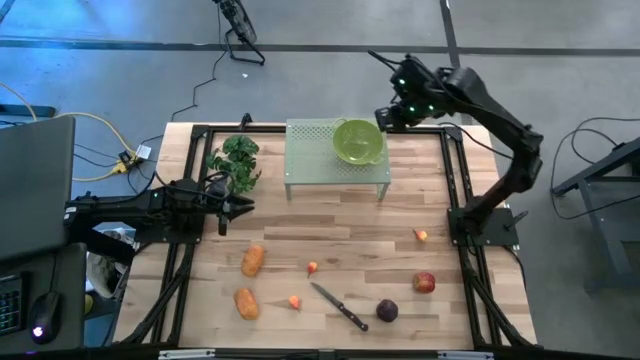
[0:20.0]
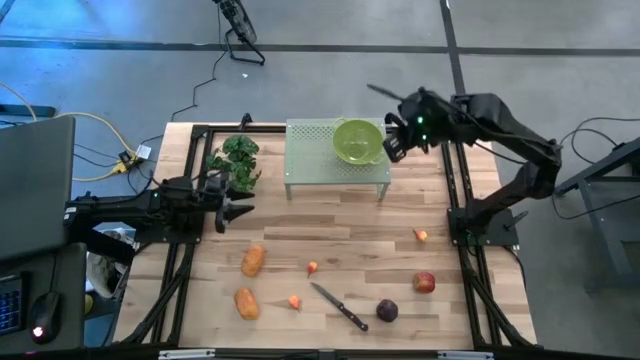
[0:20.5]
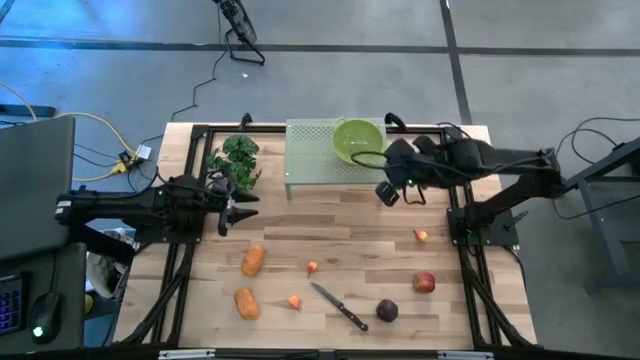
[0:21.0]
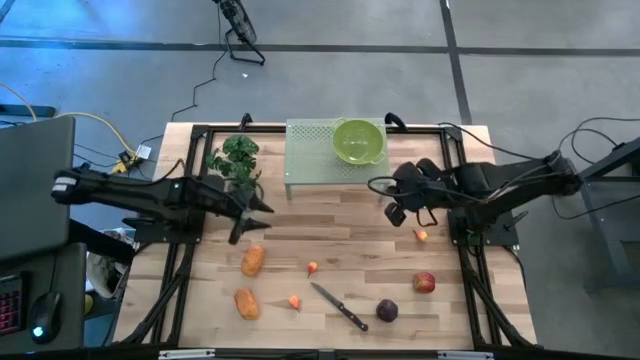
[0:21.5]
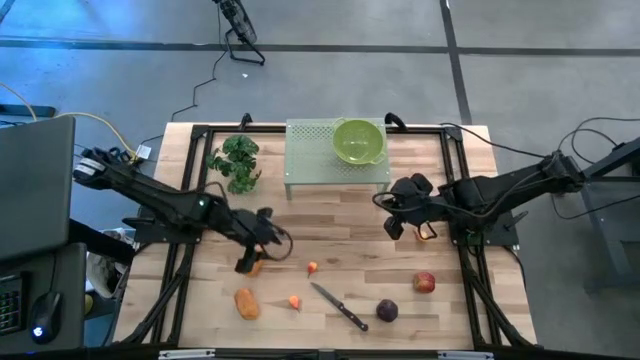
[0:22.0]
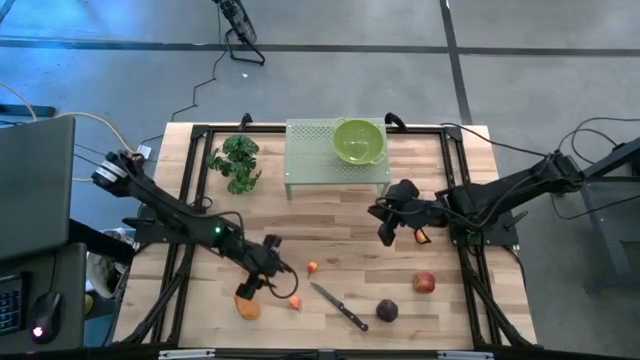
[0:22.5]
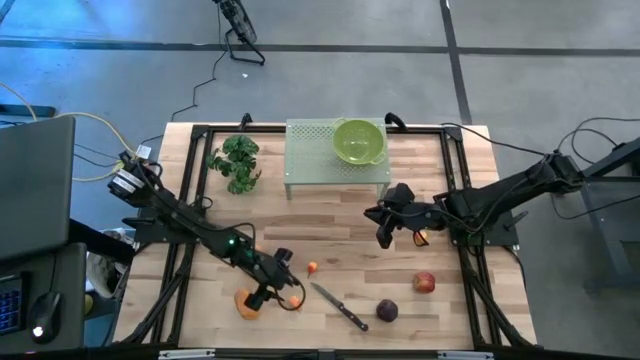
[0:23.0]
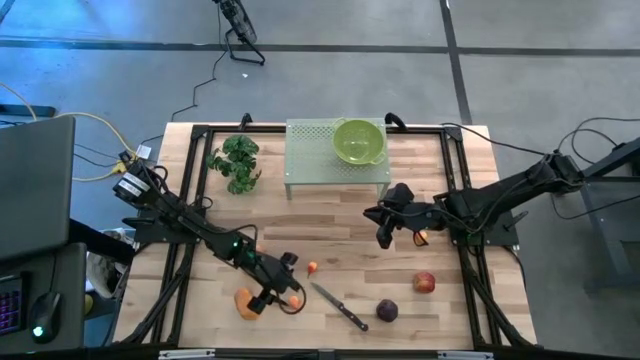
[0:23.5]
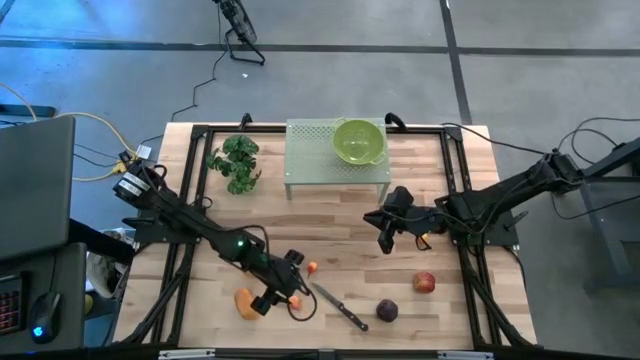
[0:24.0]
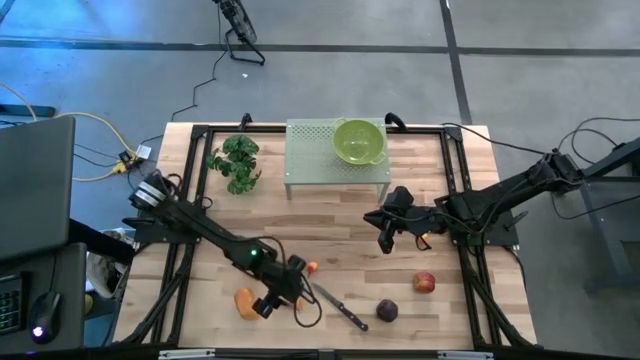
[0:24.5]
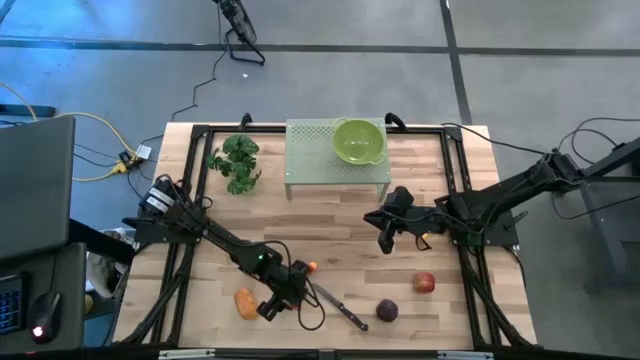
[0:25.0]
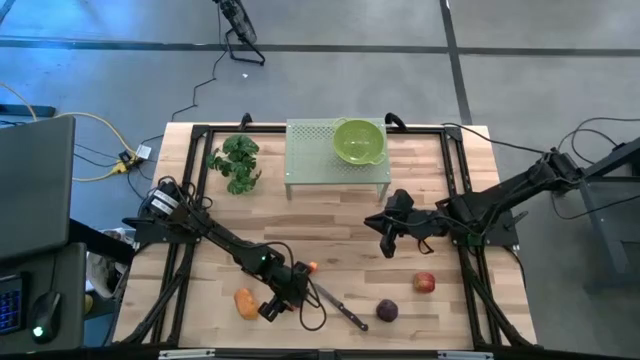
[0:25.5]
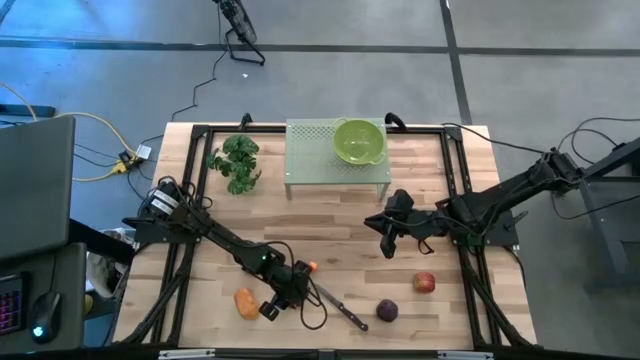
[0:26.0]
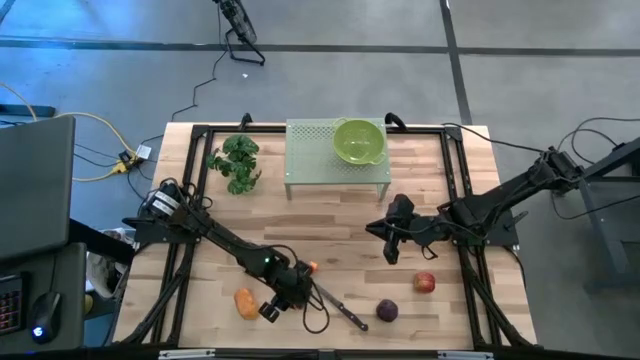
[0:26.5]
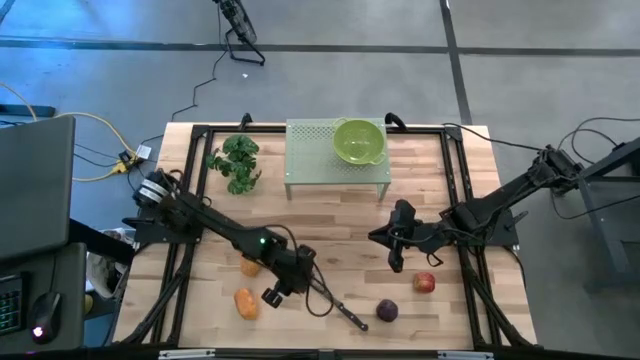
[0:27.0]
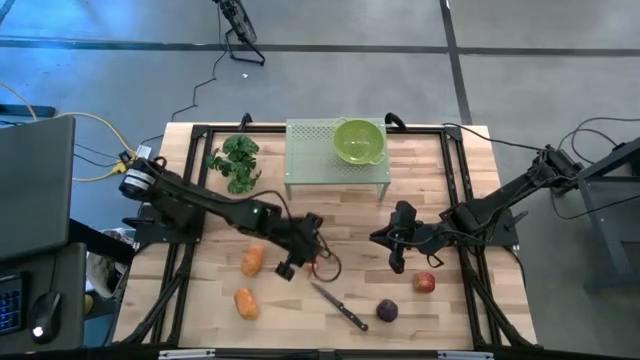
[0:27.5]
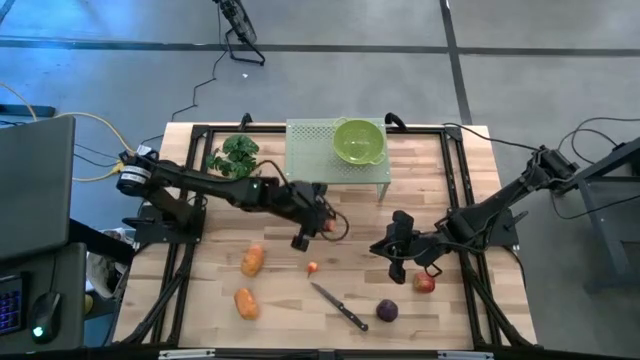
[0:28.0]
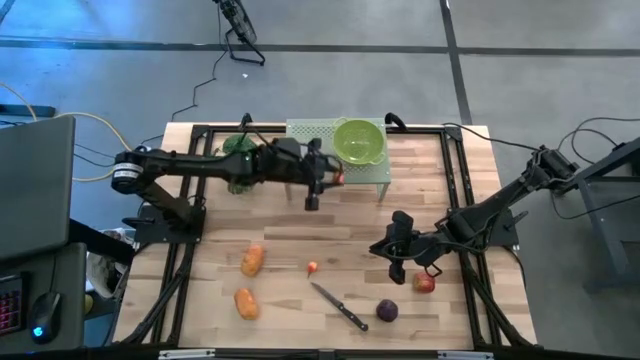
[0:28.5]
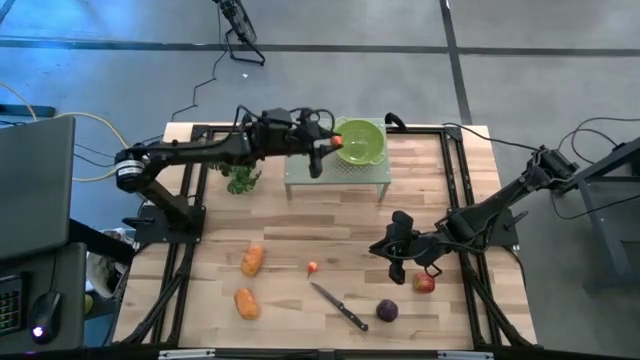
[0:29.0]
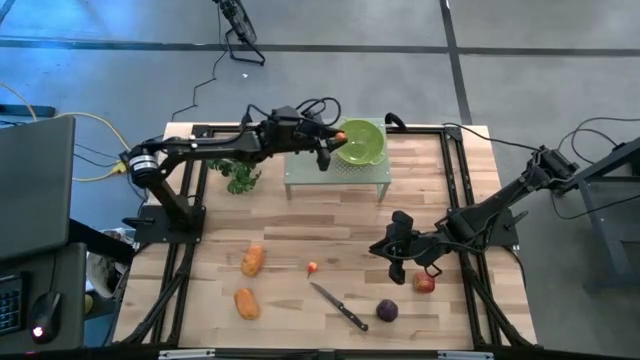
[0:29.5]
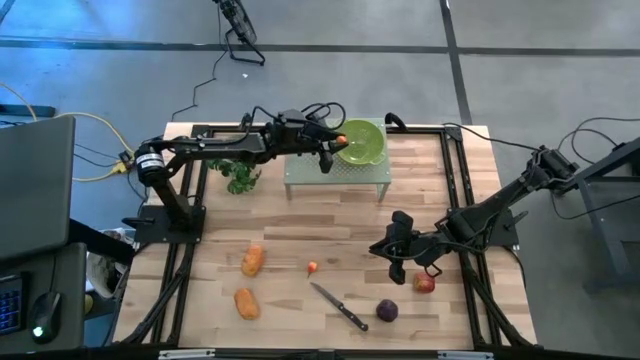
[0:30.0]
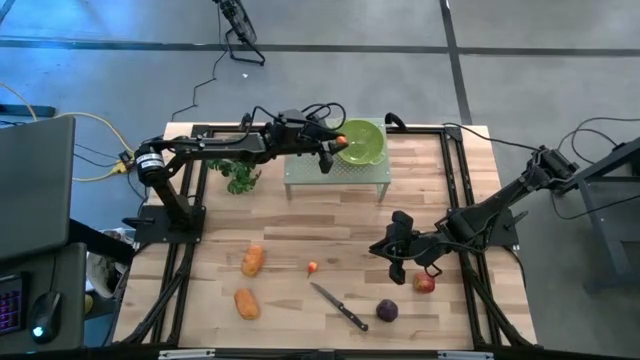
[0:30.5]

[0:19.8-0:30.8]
Task: Pick & Place Fruit
Put the bottom orange pear inside the green strainer bowl on the top shelf

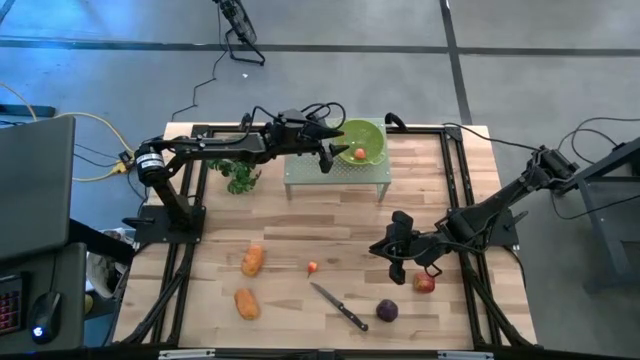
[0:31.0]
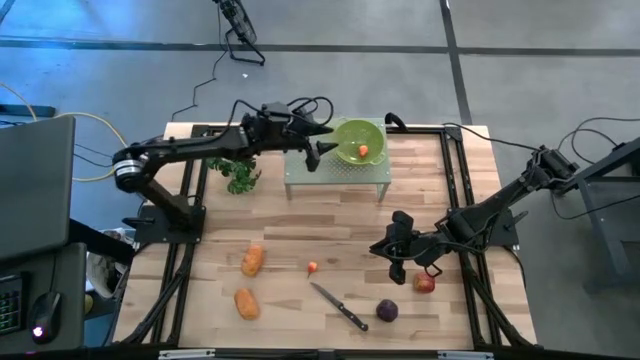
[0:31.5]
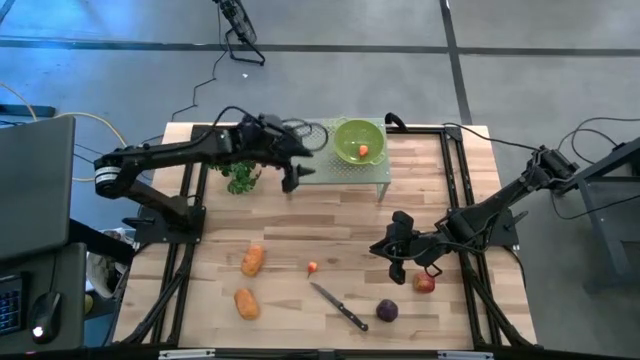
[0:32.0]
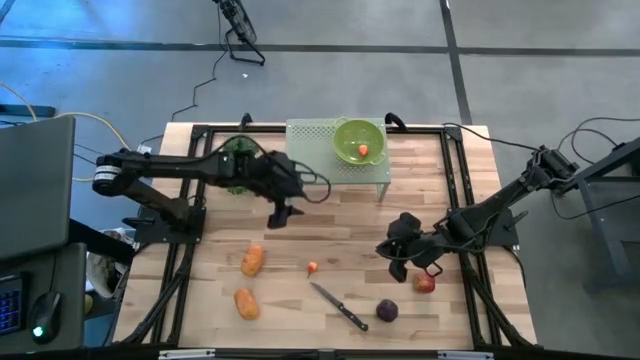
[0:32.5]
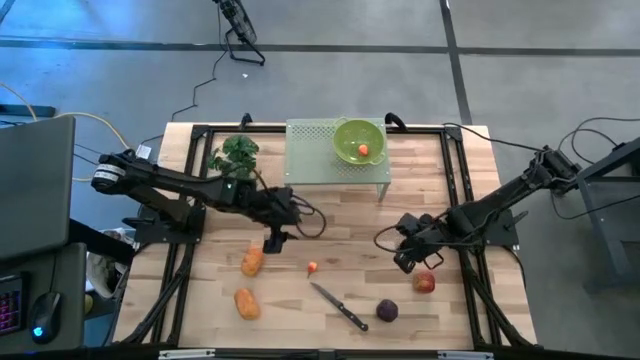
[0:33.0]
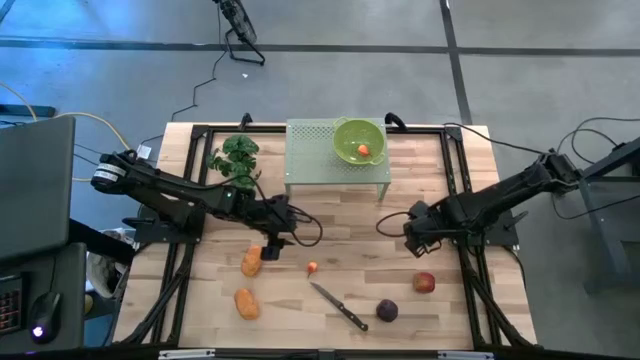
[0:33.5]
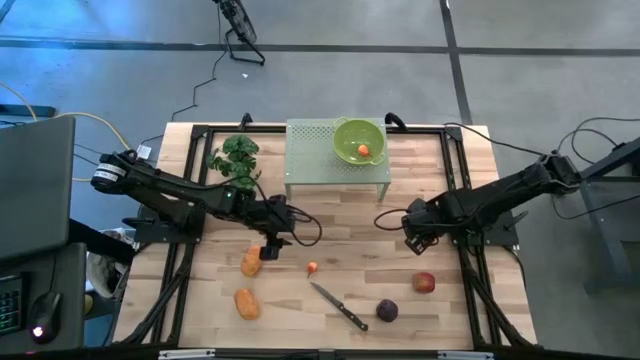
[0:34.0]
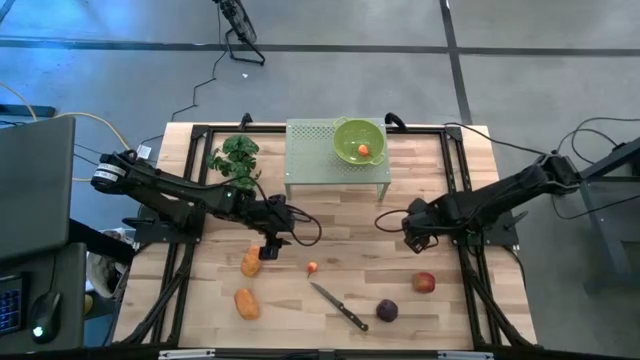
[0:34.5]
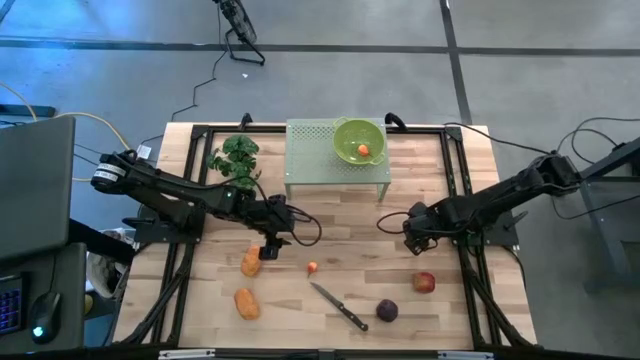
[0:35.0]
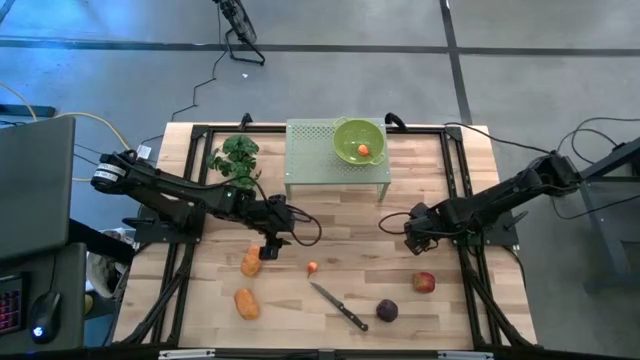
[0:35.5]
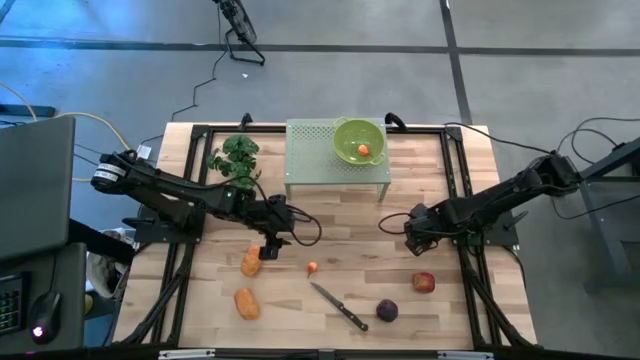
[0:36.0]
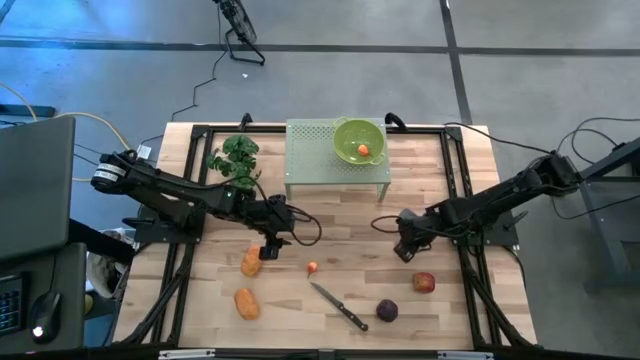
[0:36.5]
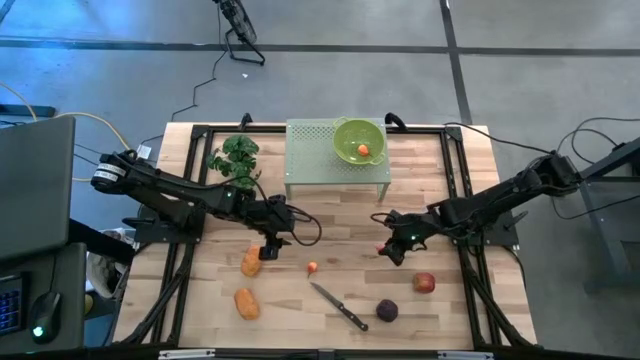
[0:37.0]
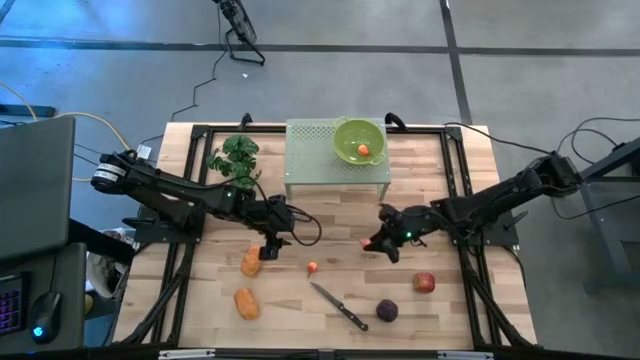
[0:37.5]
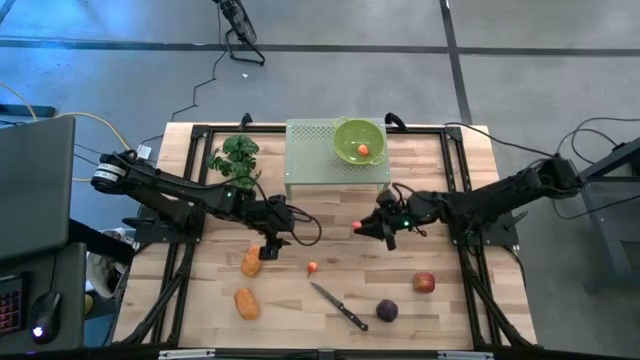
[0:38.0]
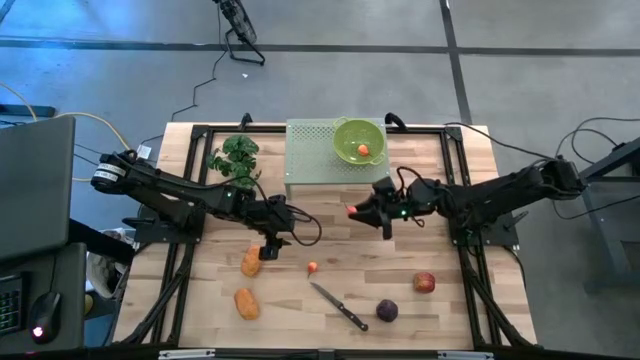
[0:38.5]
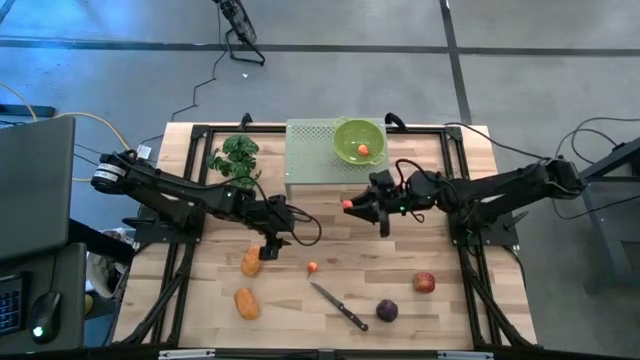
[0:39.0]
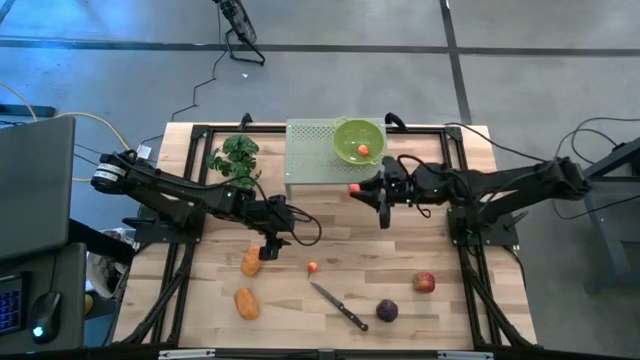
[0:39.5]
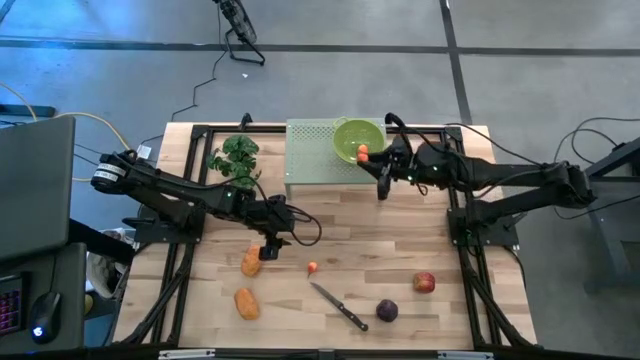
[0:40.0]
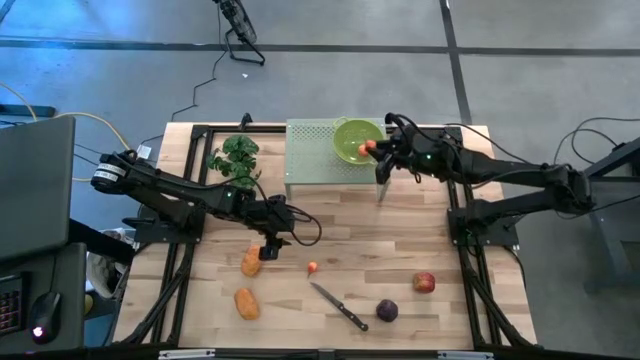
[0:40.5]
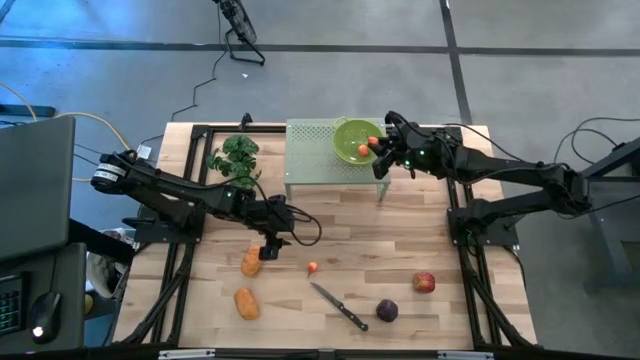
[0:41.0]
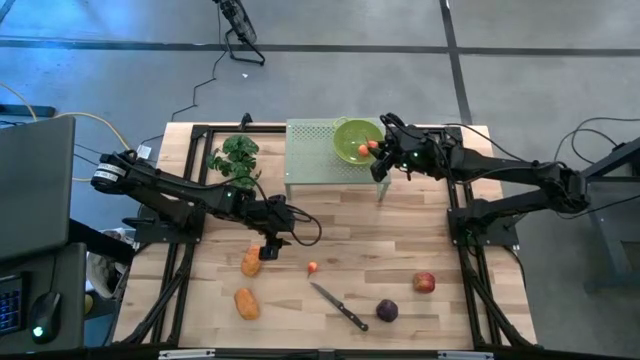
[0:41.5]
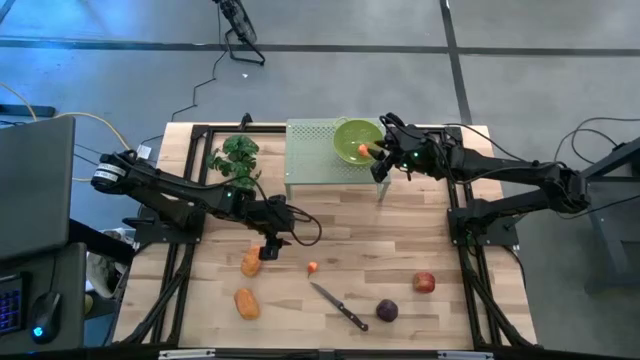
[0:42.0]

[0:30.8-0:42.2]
Put the right orange pear inside the green strainer bowl on the top shelf
